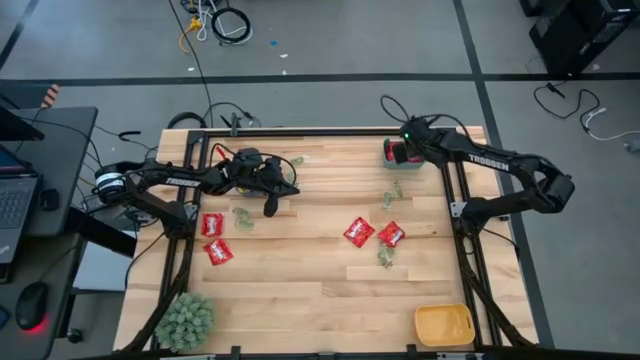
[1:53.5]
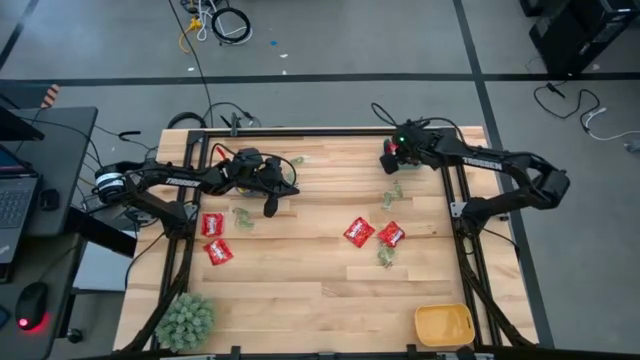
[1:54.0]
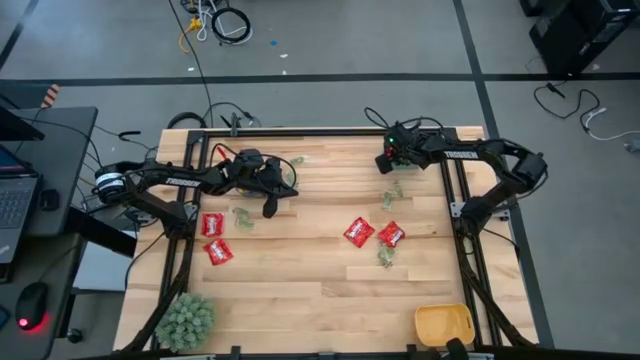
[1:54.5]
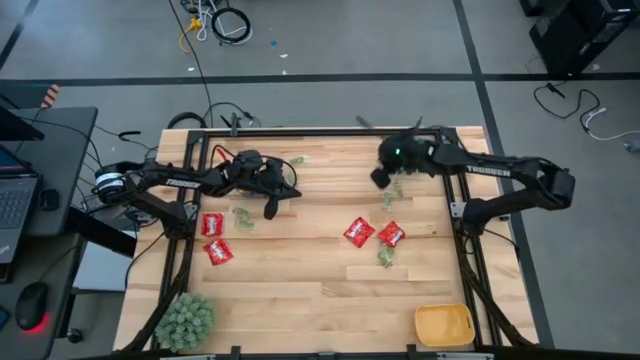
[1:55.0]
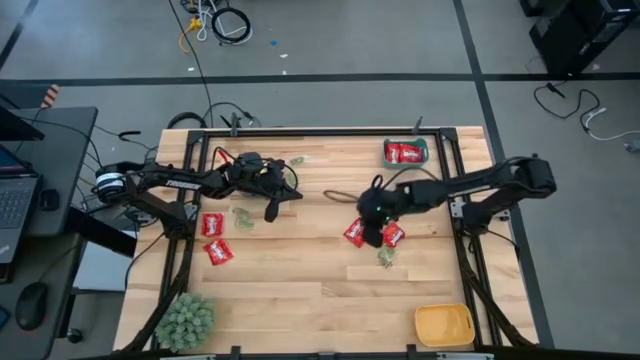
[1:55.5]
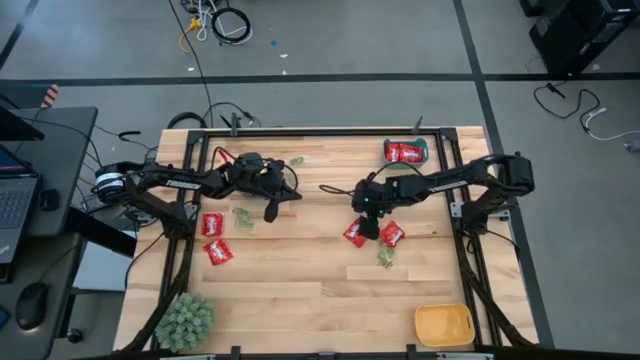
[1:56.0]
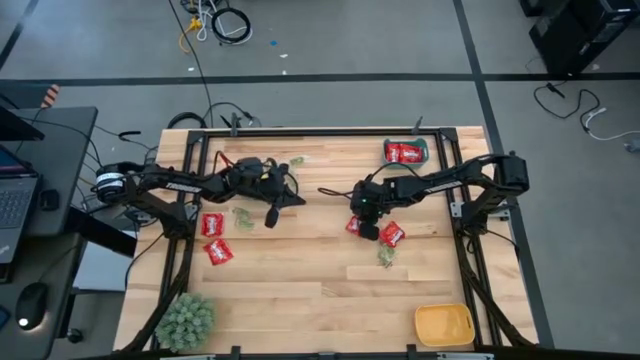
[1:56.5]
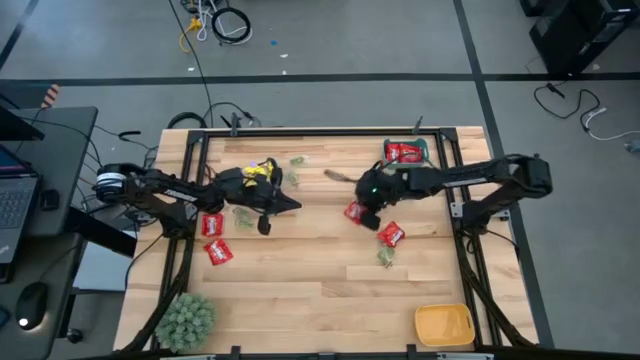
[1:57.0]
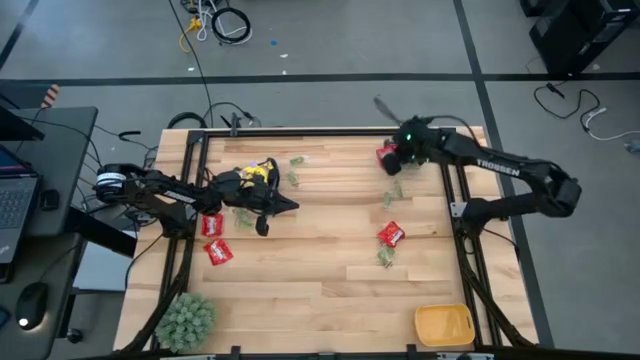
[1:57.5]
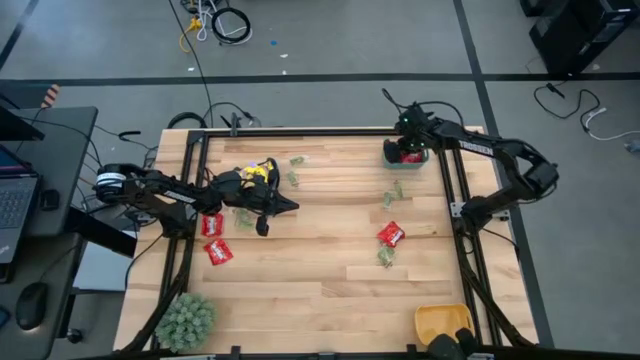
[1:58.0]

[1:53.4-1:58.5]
Task: Sort candy
Put the red candy into the blue bin

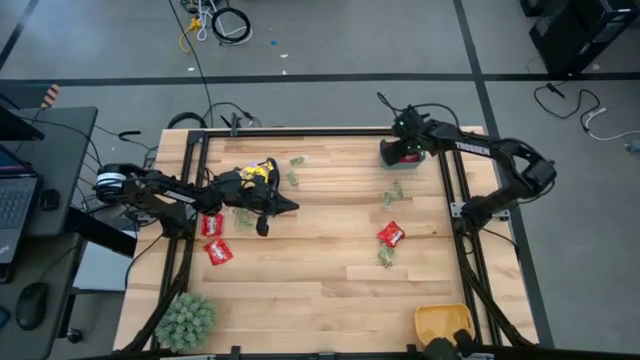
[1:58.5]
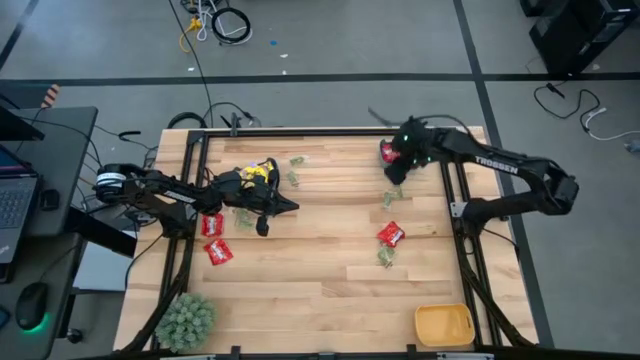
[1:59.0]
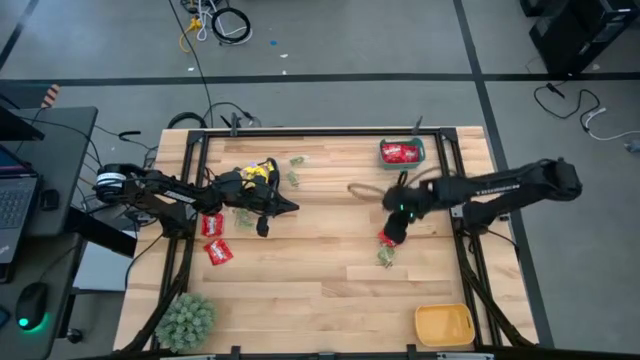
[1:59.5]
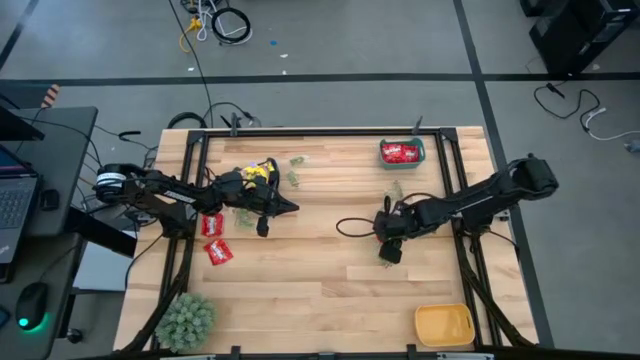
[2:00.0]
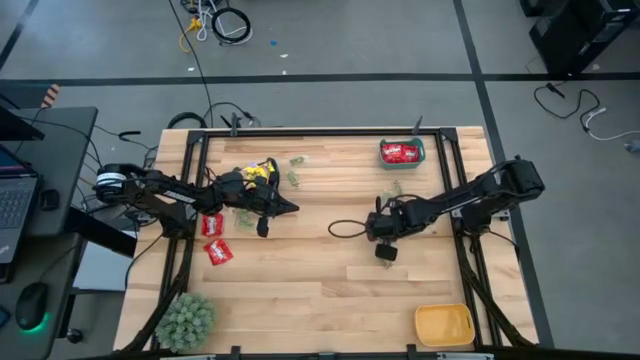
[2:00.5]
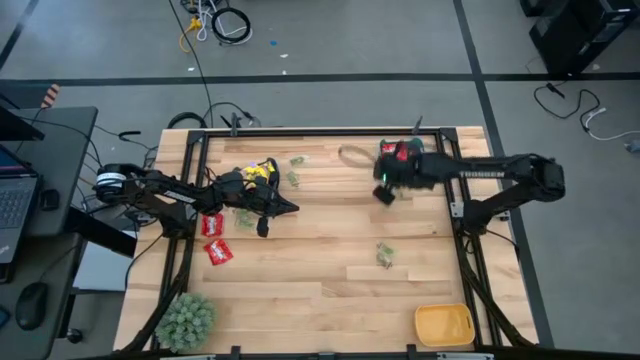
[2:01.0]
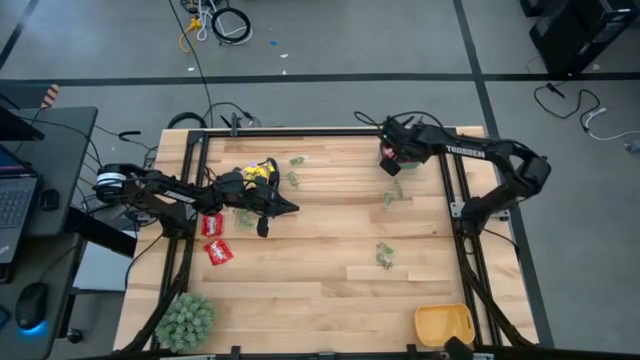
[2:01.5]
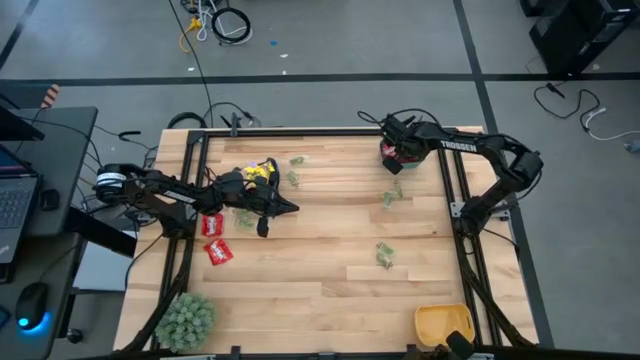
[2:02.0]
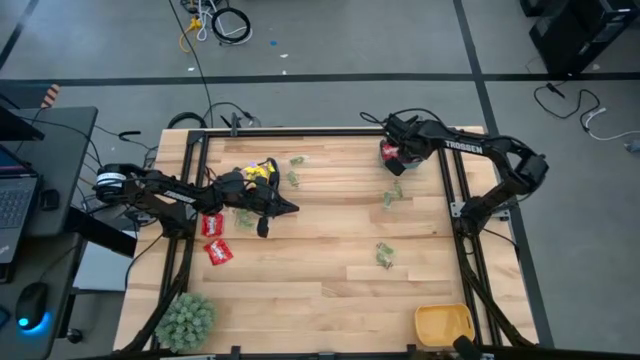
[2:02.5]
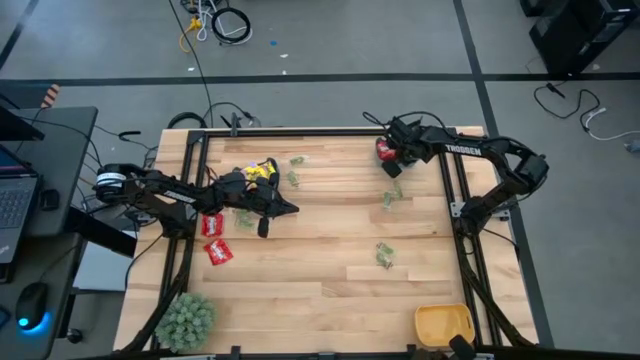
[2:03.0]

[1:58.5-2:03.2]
Put the red candy into the blue bin

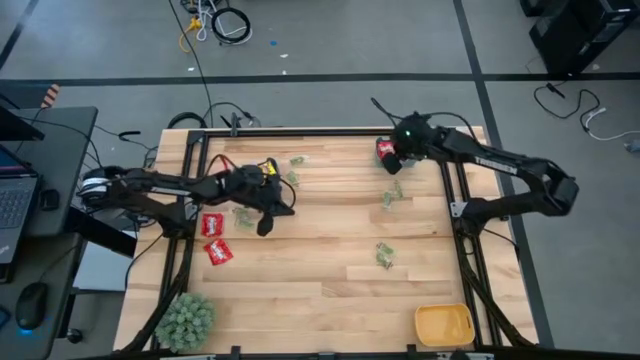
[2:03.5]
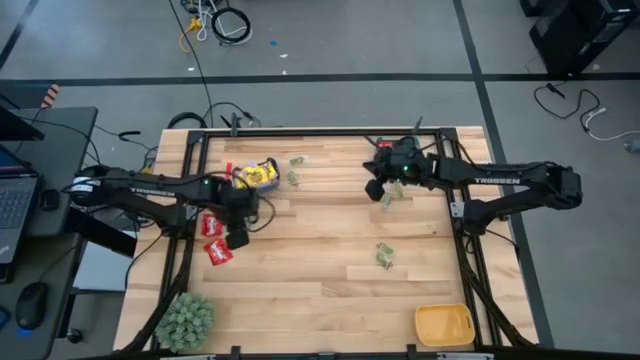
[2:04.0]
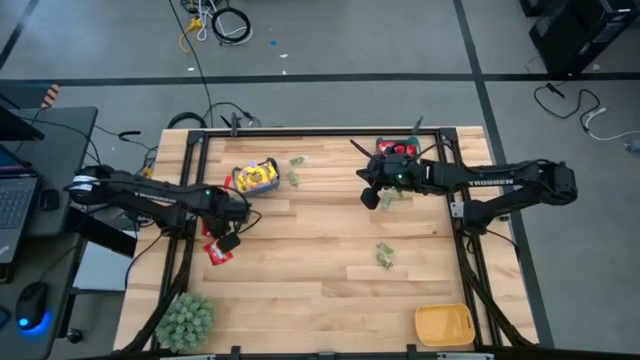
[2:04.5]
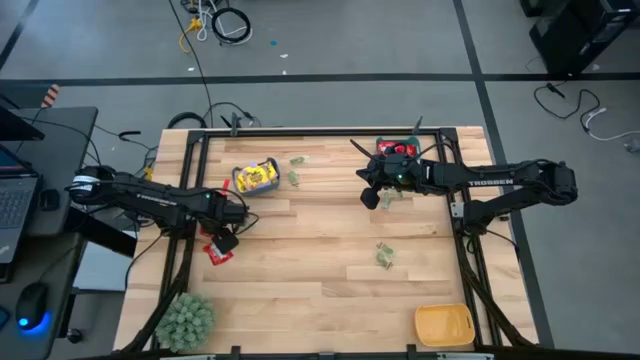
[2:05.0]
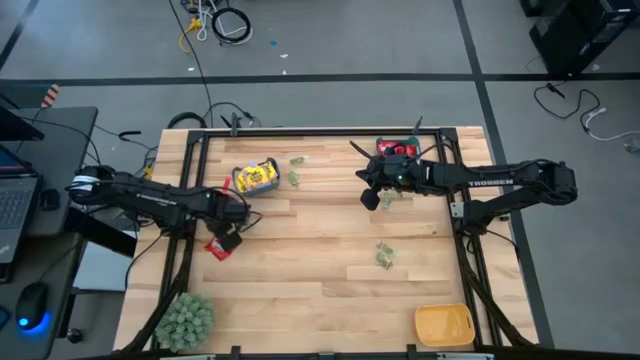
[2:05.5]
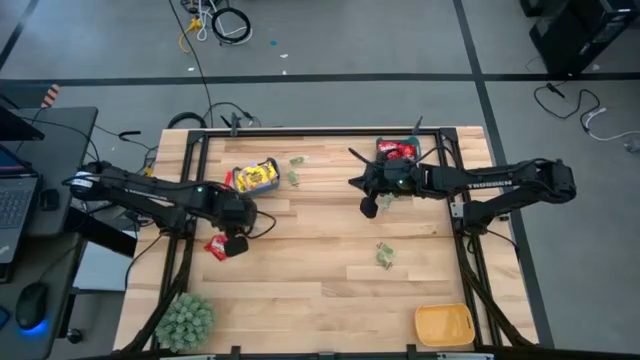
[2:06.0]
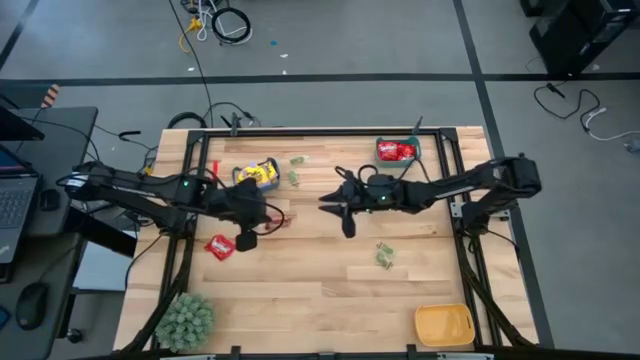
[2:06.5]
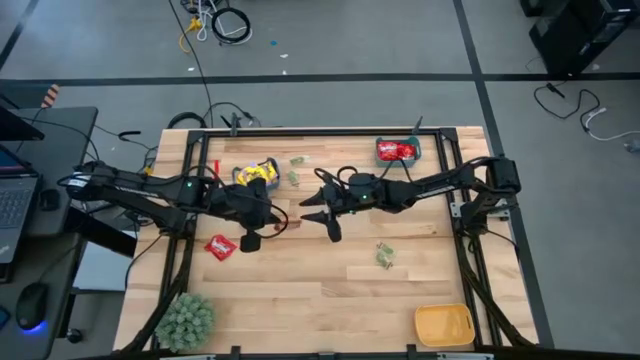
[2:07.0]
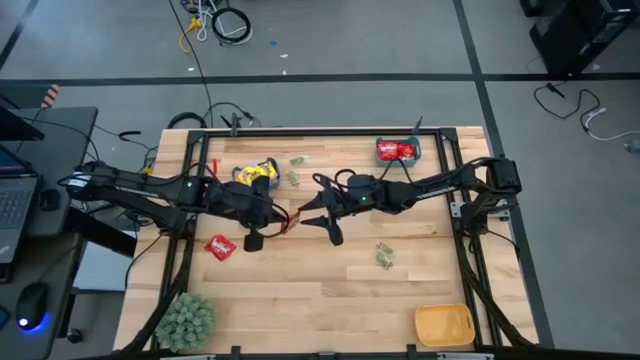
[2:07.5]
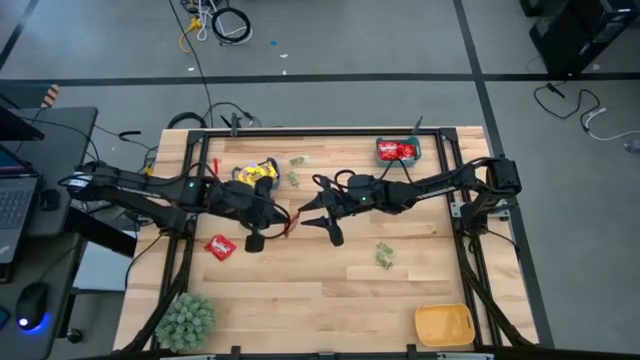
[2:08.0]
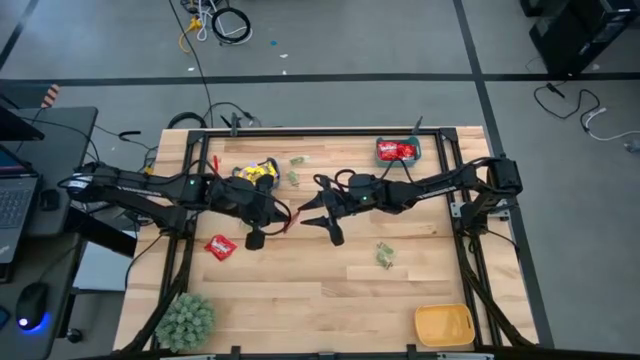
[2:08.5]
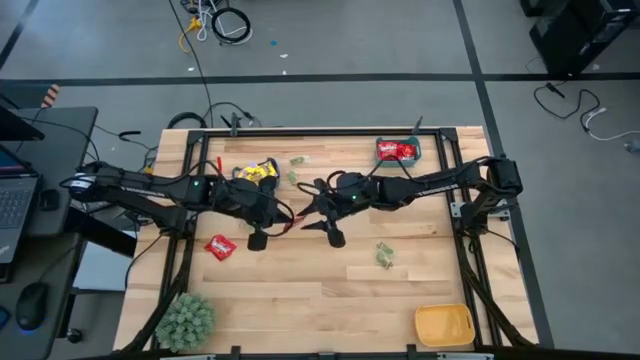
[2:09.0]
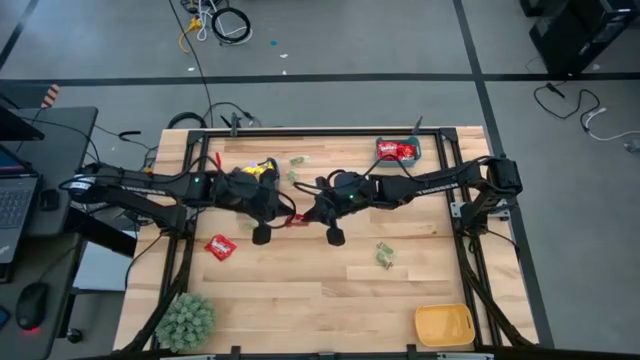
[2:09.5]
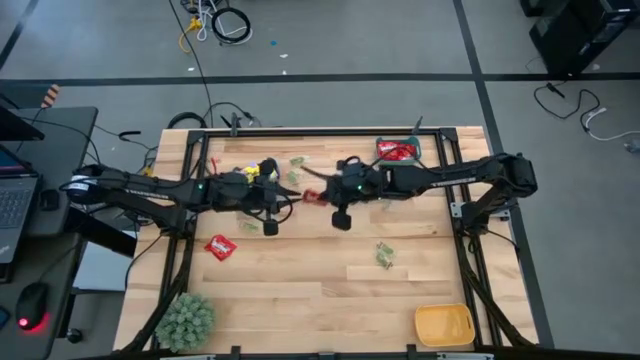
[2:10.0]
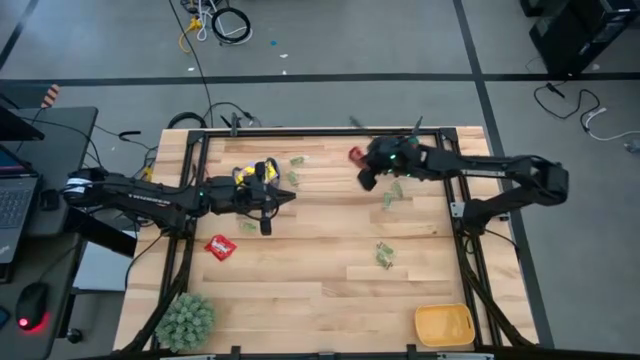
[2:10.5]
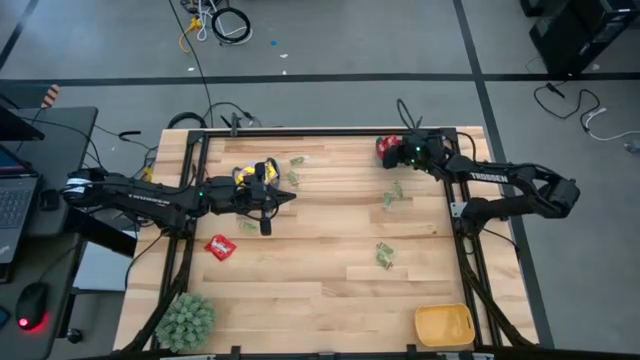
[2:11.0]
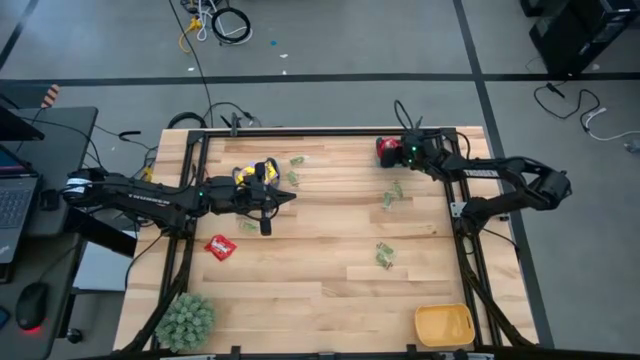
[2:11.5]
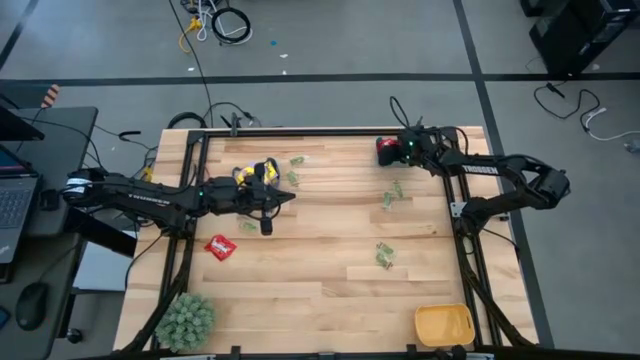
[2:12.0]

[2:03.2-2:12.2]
Put the red candy into the blue bin

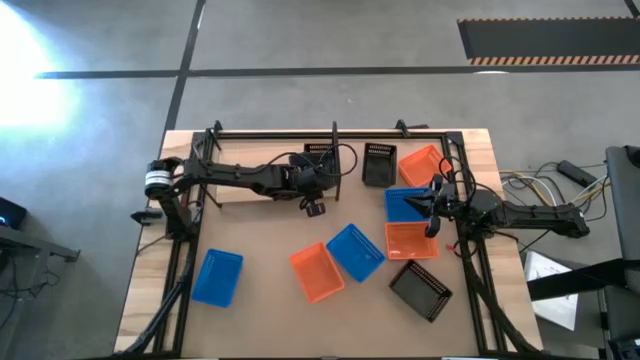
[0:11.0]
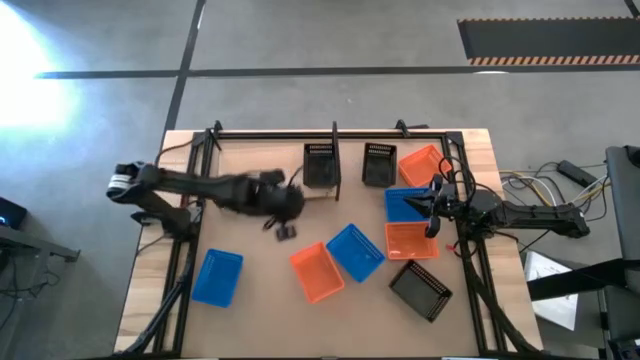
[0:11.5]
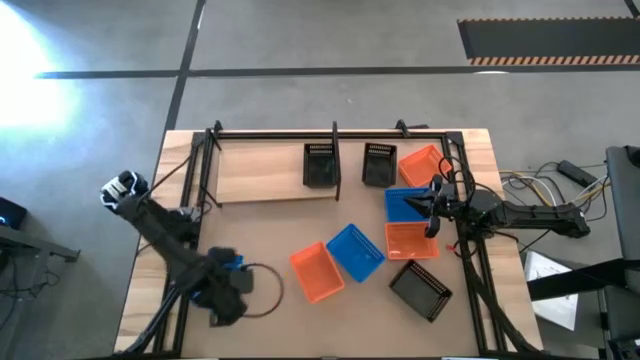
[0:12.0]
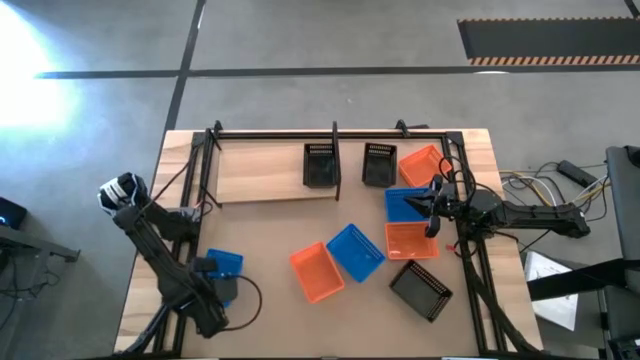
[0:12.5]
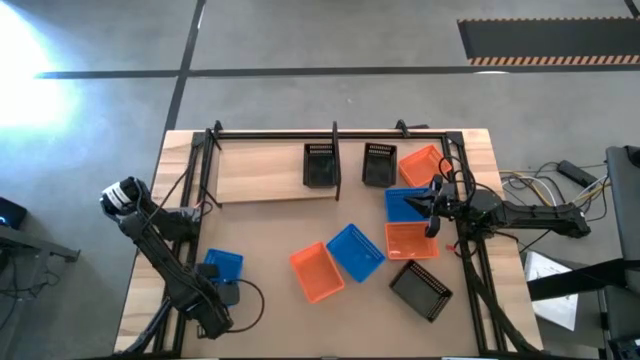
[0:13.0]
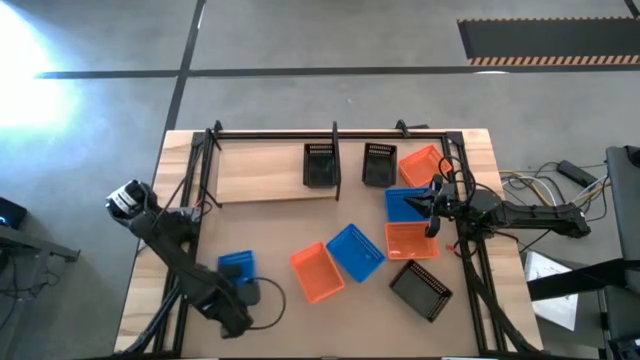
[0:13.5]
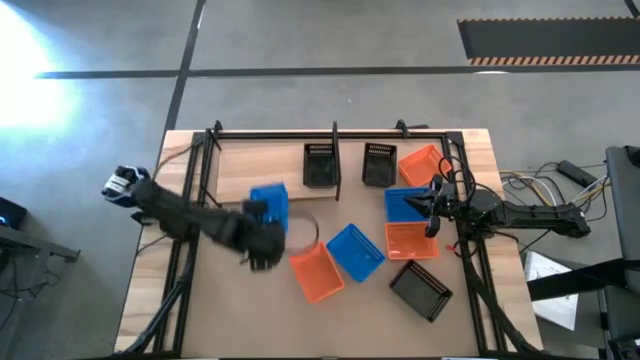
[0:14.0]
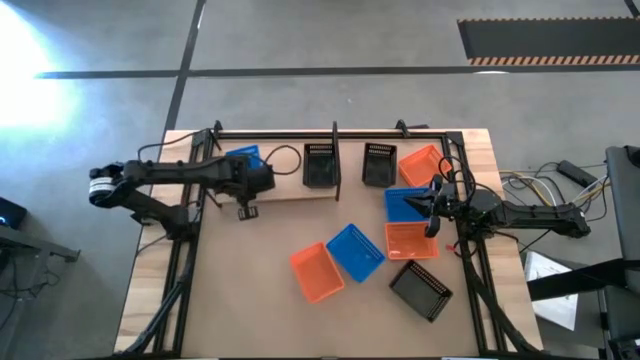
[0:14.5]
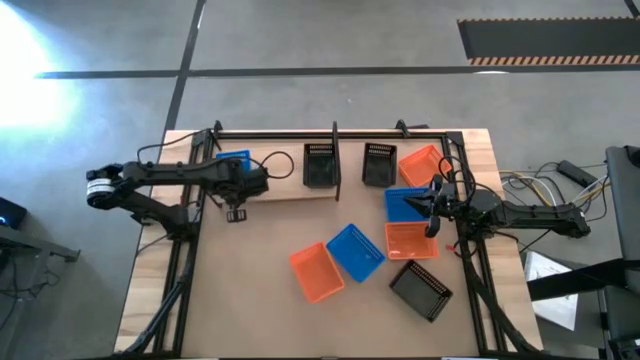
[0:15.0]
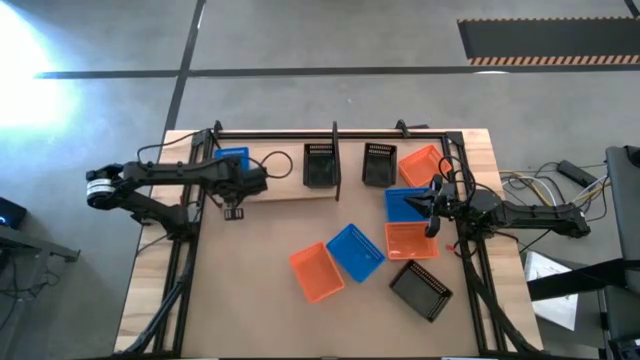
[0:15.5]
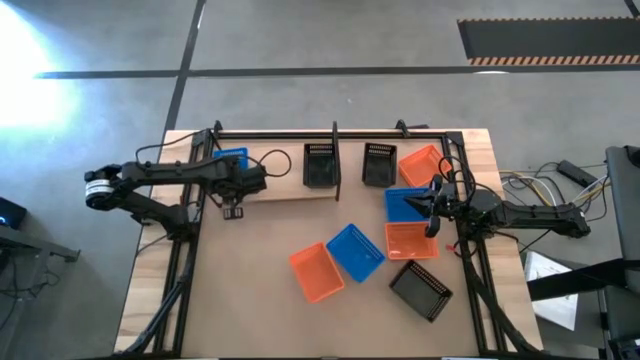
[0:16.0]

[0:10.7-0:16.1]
Task: Stack baskets on shelf by color
Put the bottom left blue basket on the shelf
